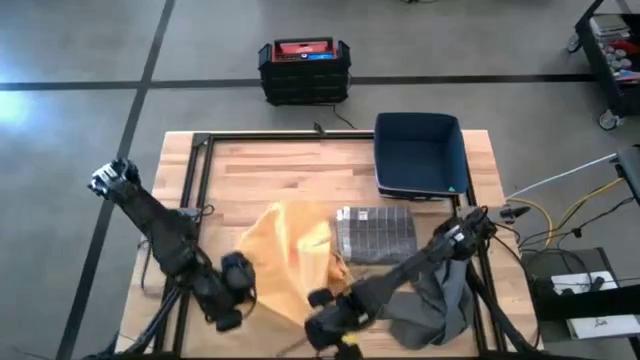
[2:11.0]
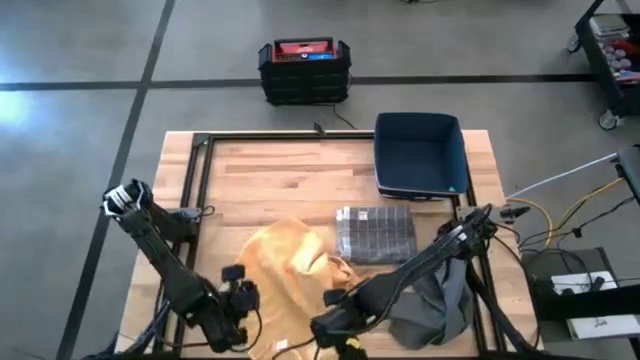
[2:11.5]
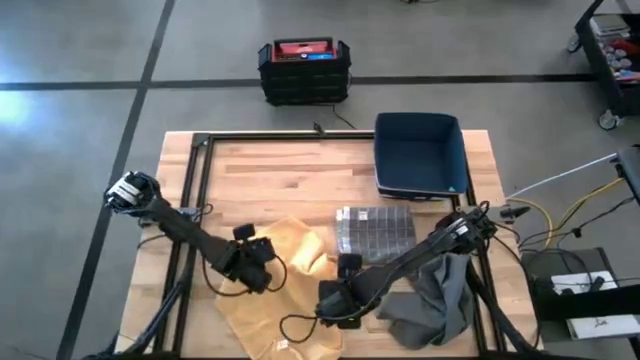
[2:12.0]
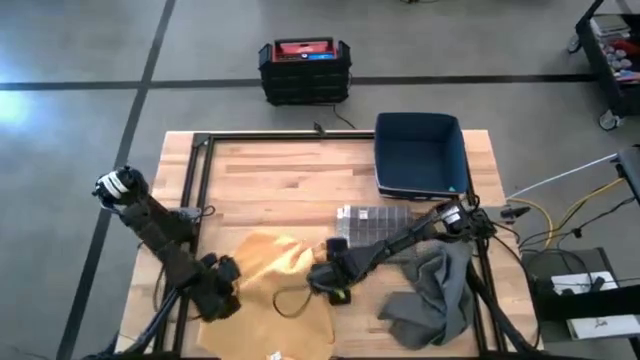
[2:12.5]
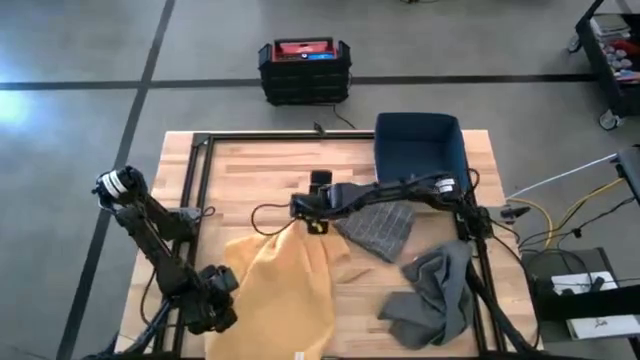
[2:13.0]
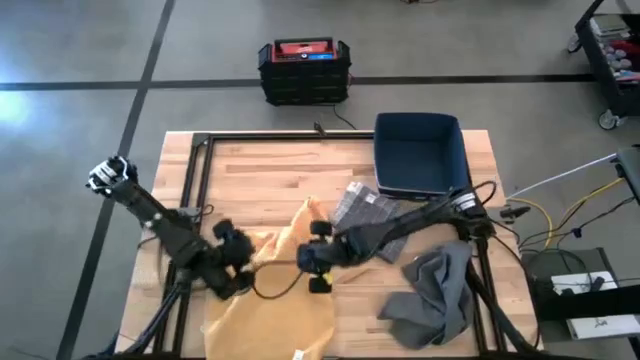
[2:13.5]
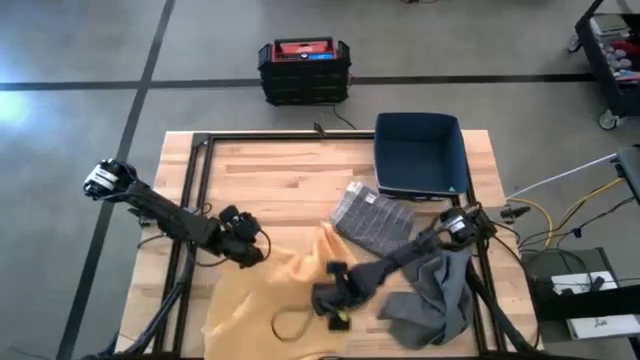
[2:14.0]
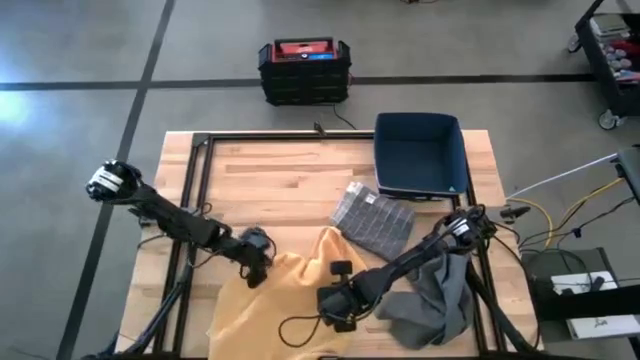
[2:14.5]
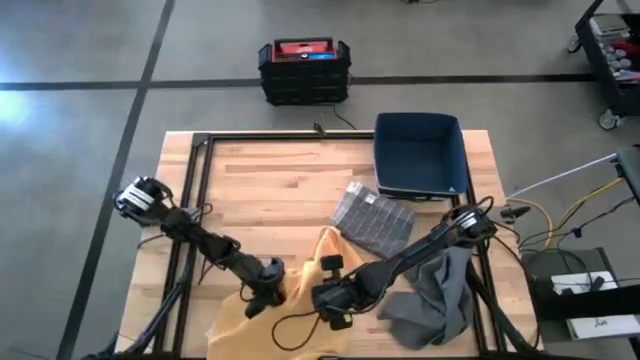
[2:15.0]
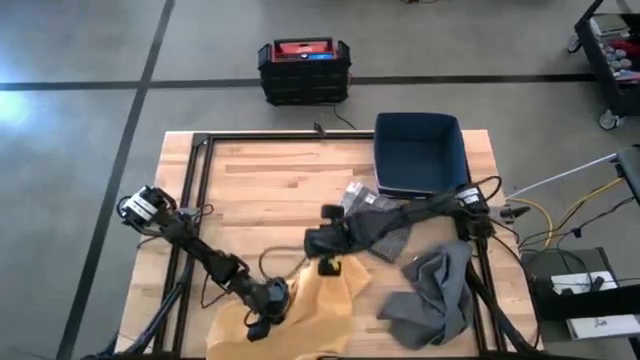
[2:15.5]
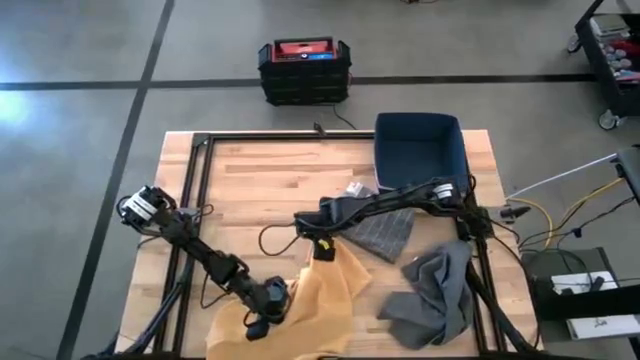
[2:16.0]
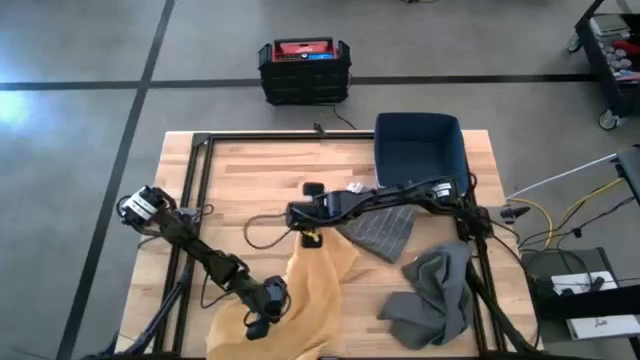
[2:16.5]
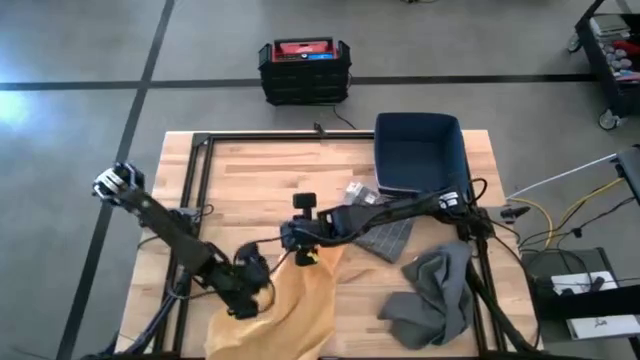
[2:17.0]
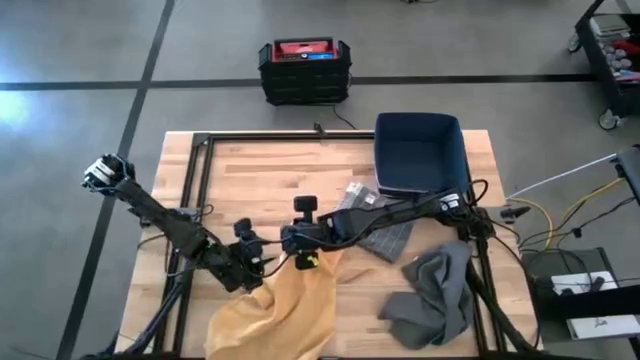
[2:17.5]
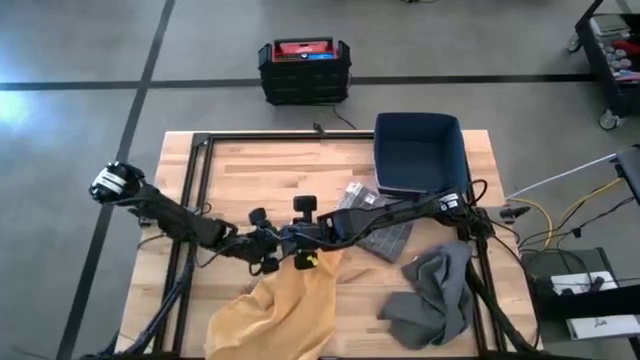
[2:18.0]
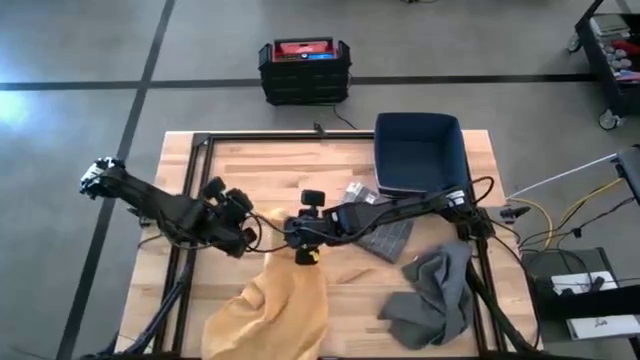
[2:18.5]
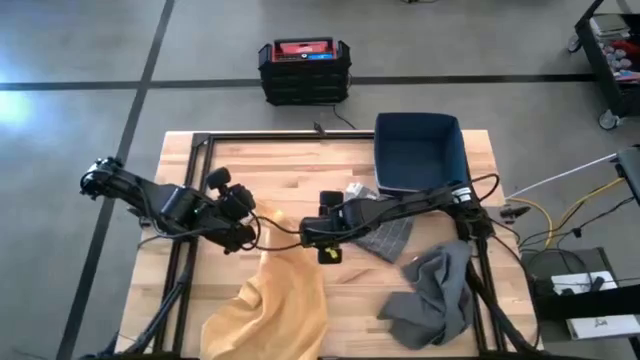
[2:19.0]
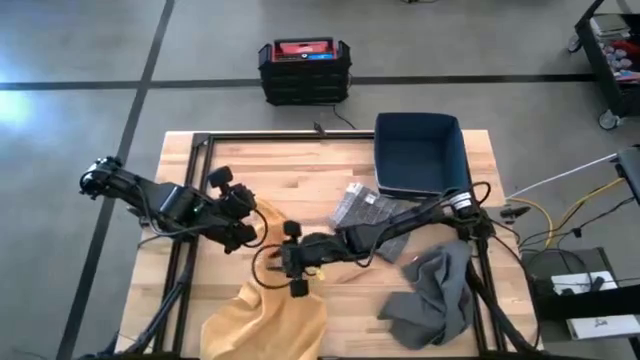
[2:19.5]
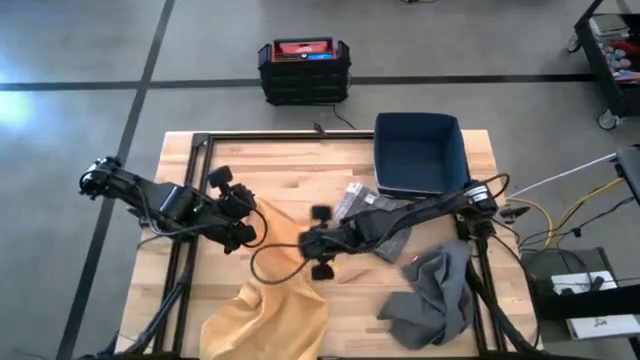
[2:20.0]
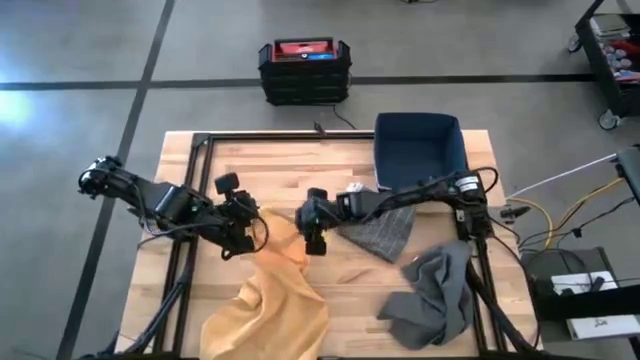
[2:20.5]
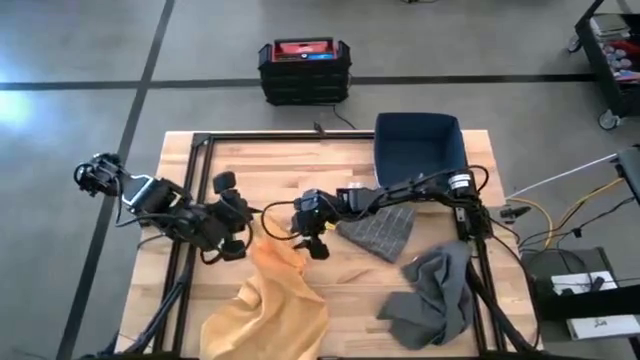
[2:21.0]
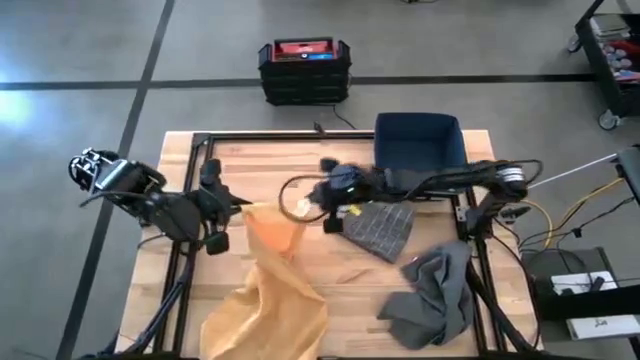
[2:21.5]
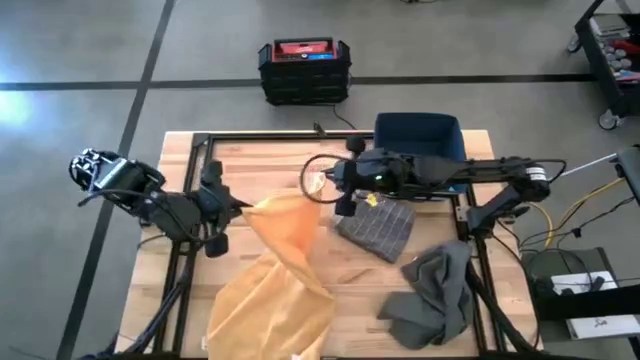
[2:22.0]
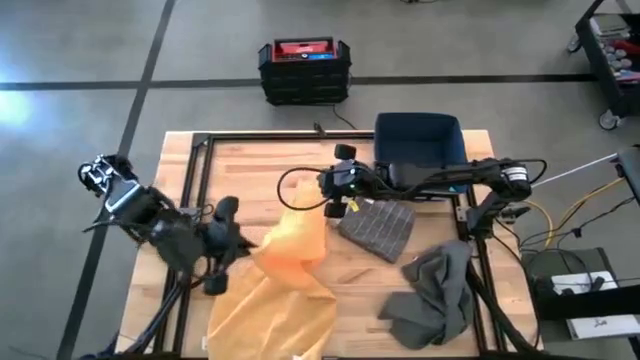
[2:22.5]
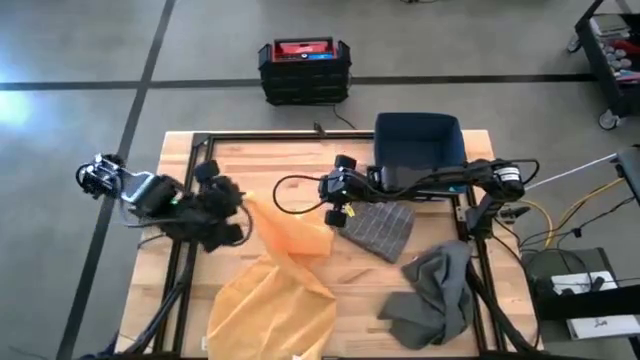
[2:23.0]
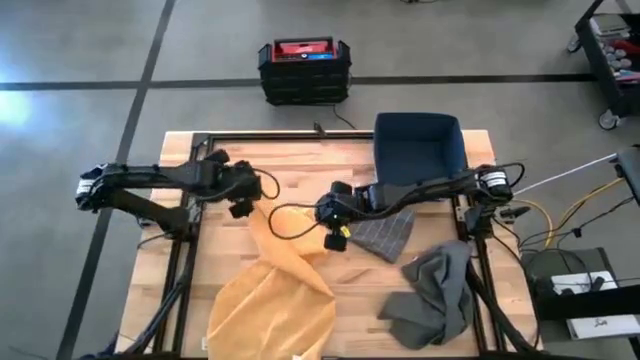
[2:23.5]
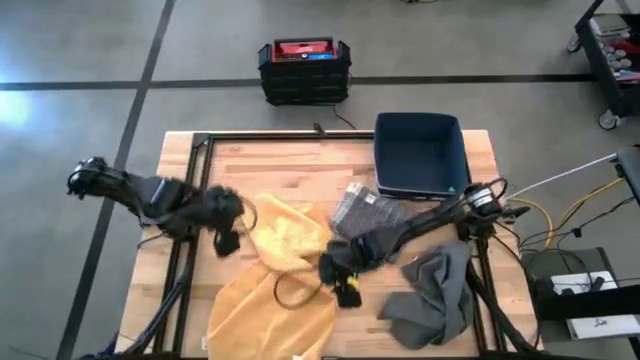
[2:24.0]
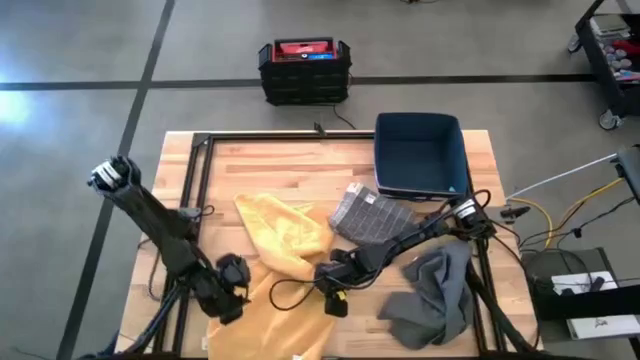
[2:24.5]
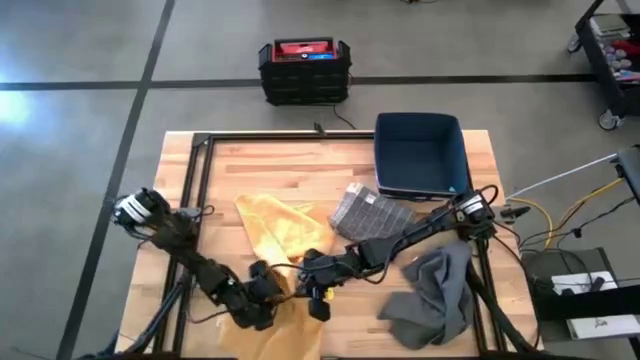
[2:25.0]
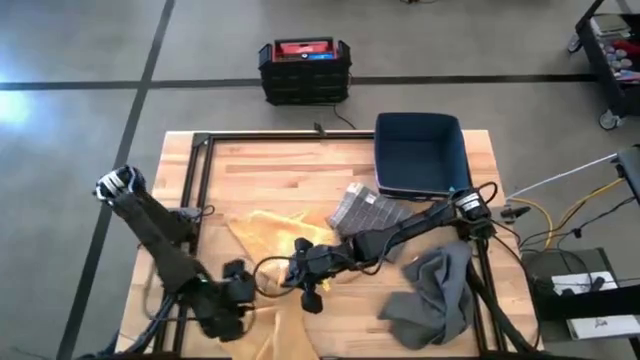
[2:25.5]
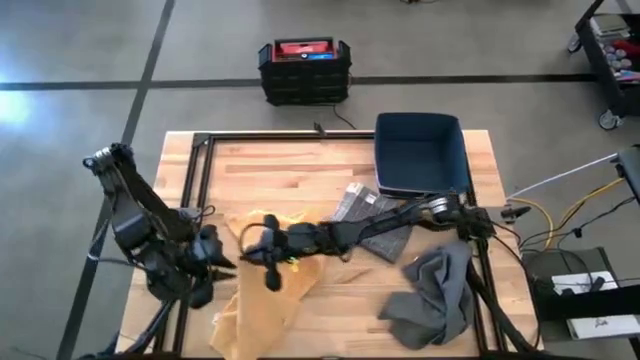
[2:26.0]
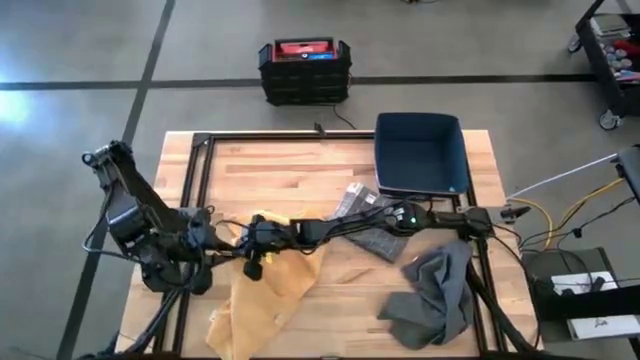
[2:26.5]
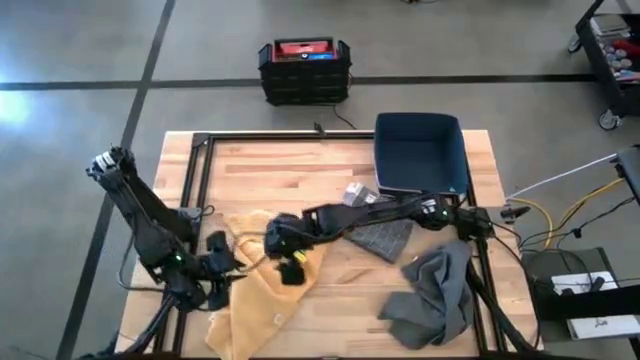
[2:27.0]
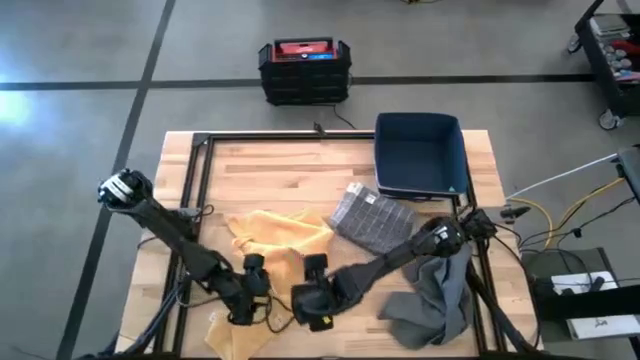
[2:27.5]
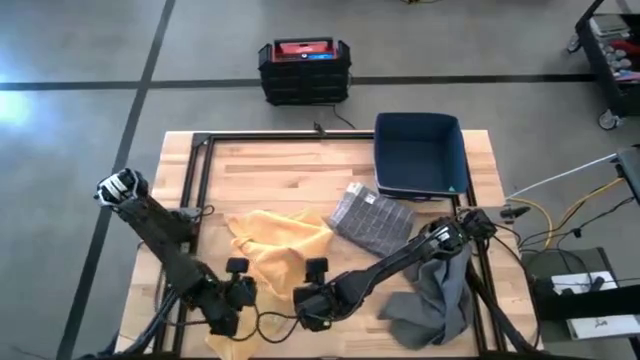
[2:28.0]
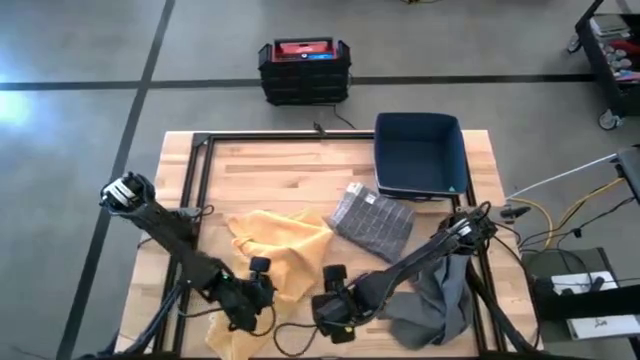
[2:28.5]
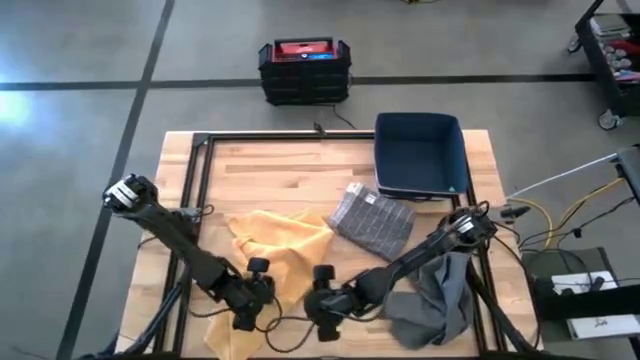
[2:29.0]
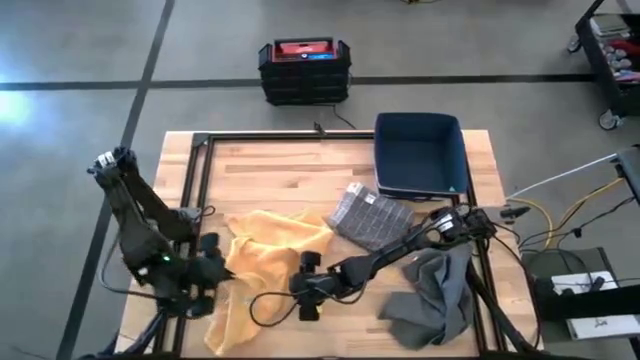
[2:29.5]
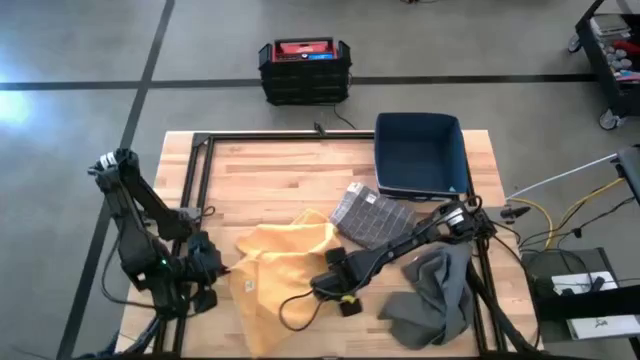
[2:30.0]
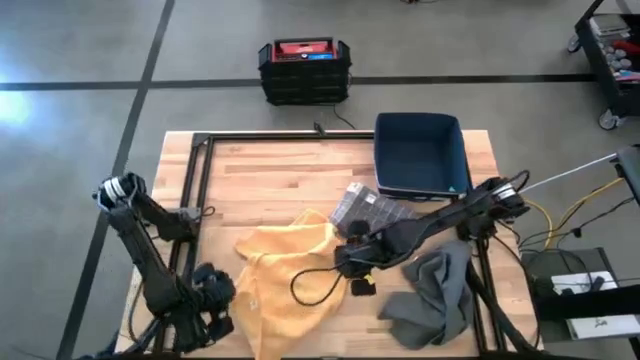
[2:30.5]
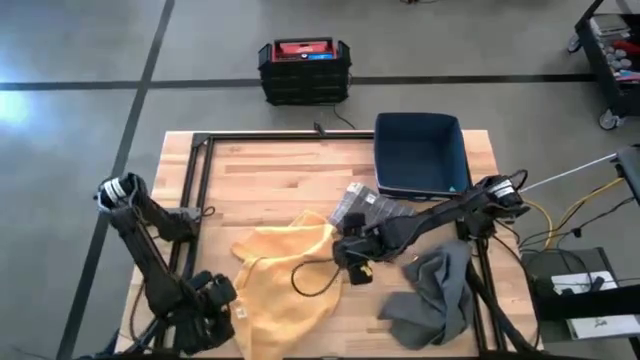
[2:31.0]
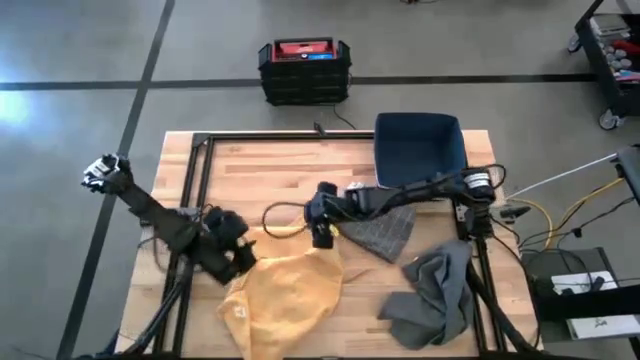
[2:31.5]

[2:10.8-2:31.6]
Task: Fold towel
Fold the yellow kitchen towel

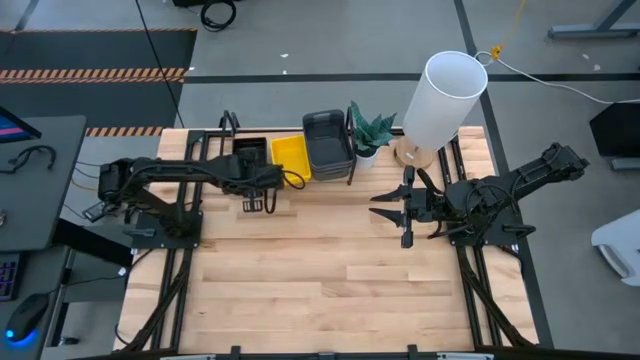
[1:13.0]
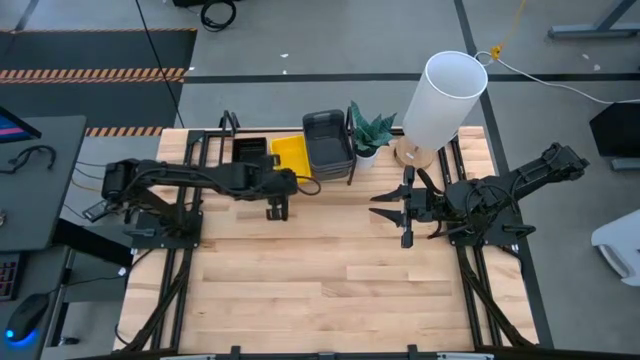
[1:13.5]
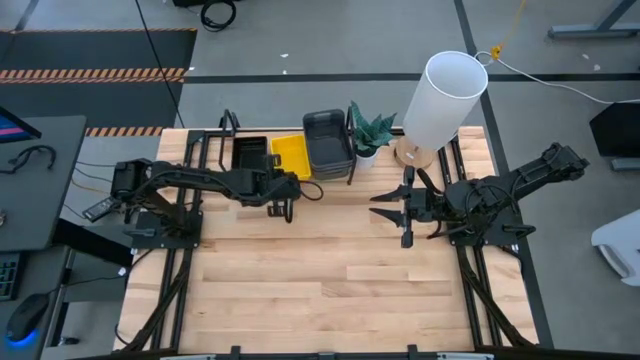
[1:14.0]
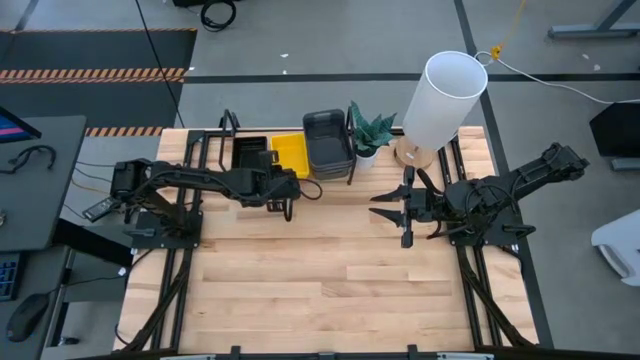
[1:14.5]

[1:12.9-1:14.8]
Task: Stack baskets on shelf by color
Adjust the yellow bin
